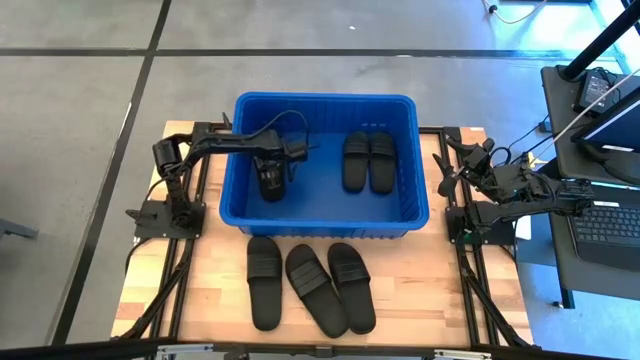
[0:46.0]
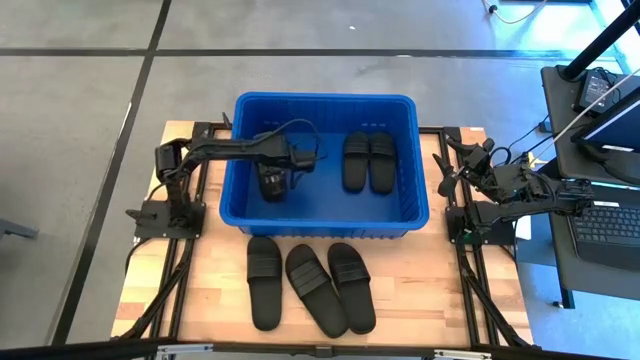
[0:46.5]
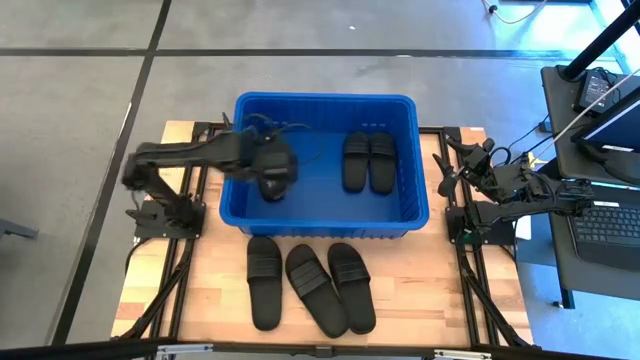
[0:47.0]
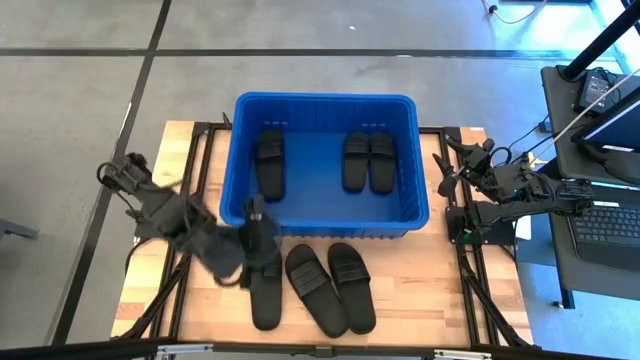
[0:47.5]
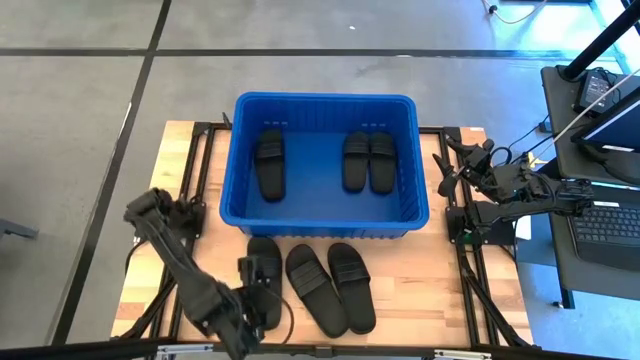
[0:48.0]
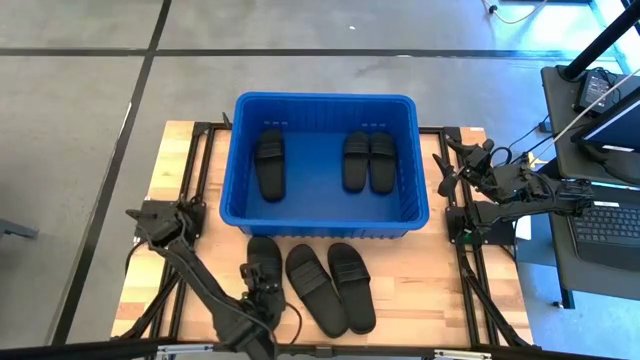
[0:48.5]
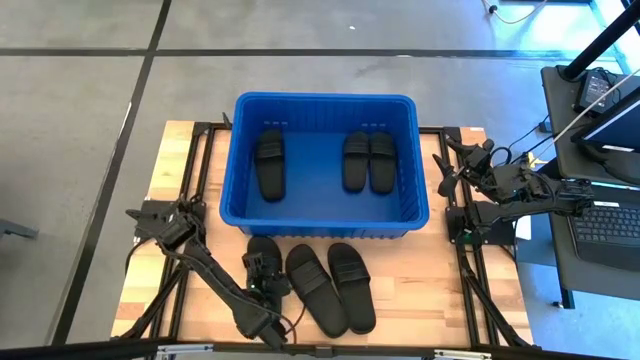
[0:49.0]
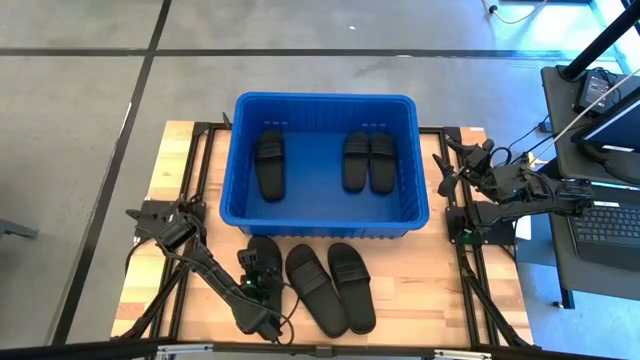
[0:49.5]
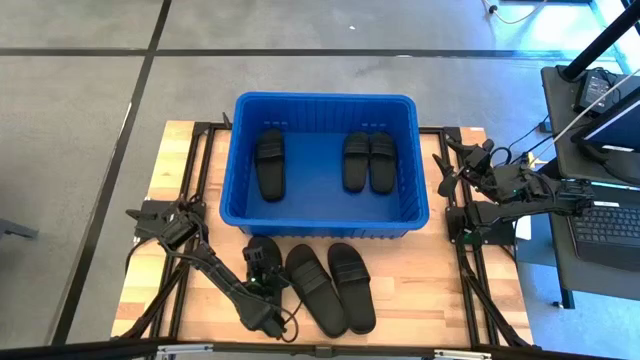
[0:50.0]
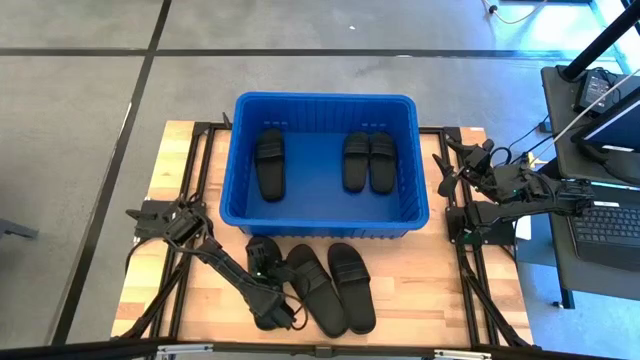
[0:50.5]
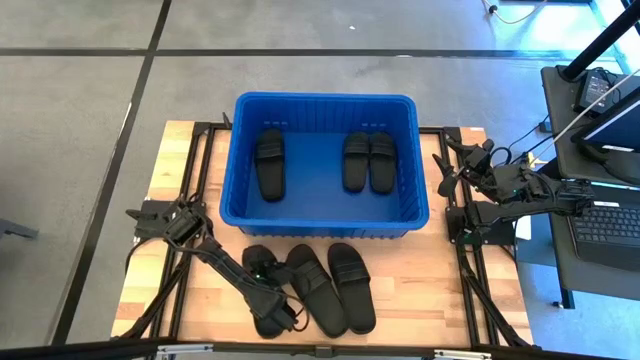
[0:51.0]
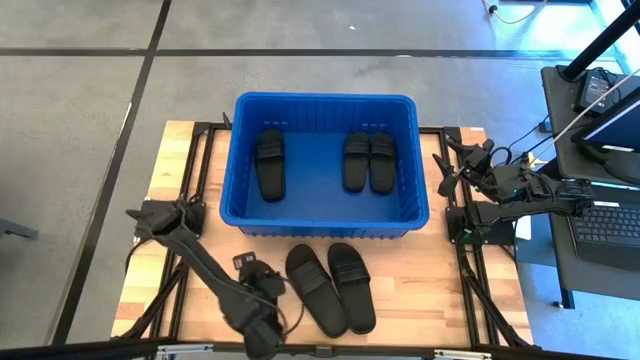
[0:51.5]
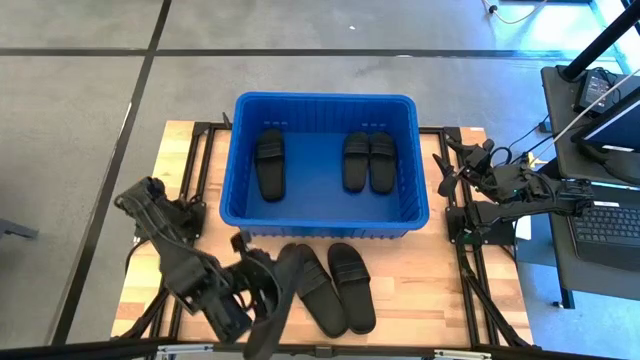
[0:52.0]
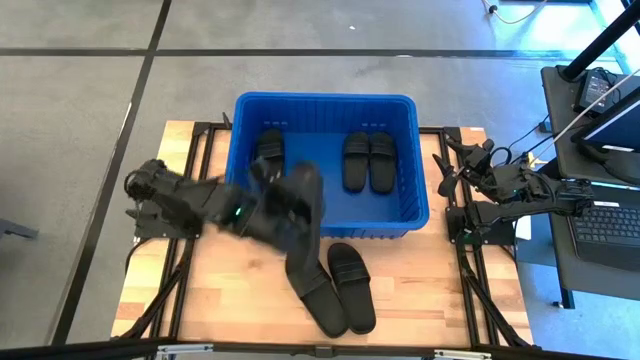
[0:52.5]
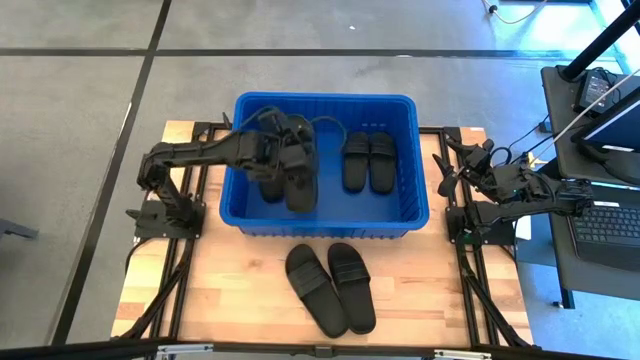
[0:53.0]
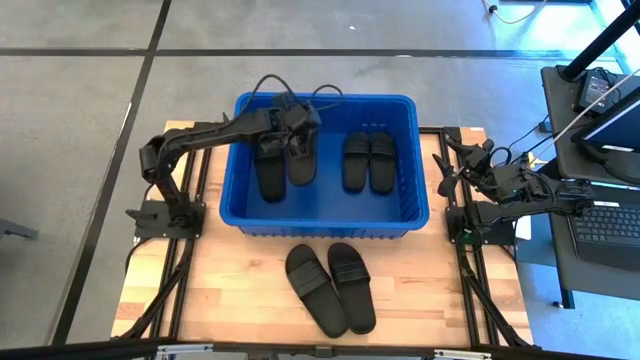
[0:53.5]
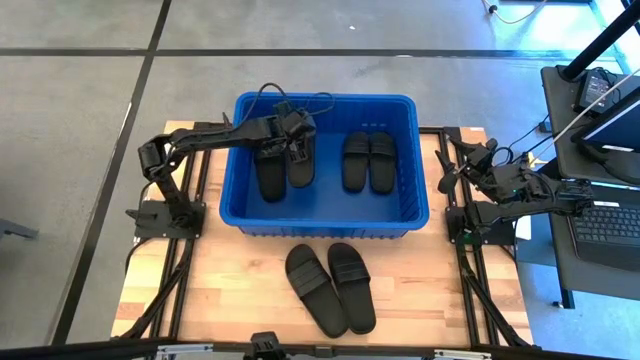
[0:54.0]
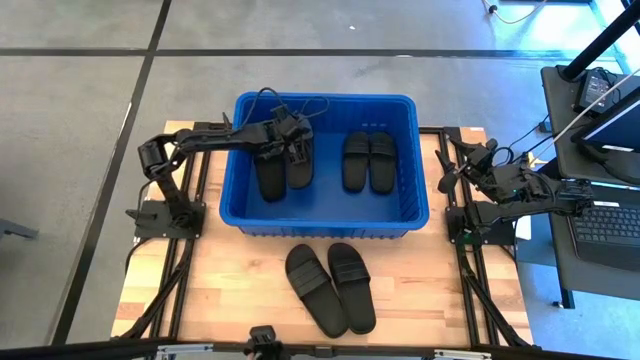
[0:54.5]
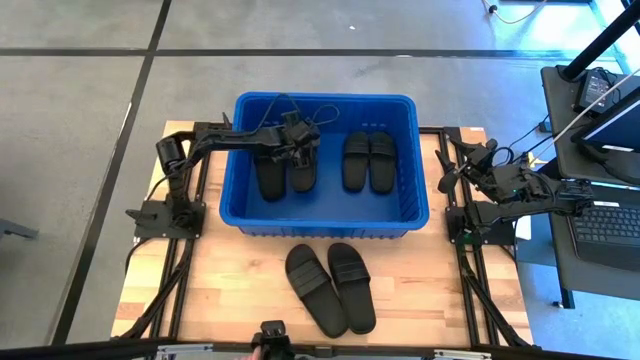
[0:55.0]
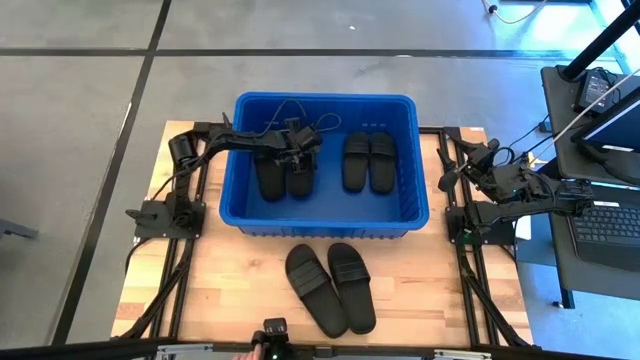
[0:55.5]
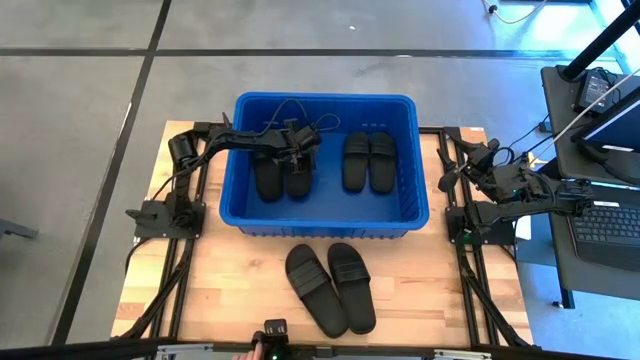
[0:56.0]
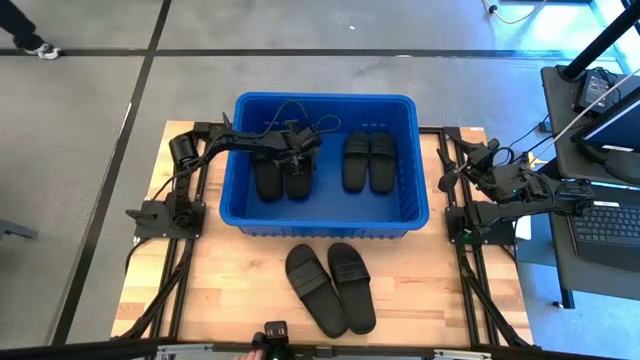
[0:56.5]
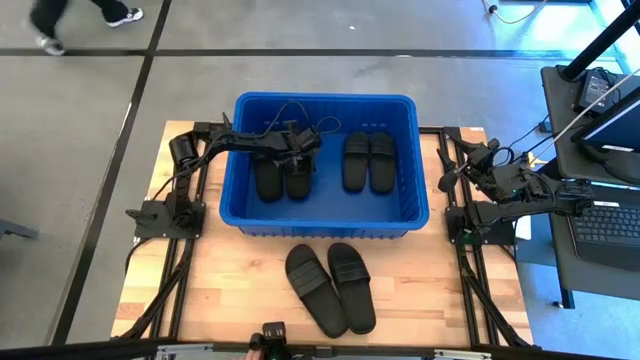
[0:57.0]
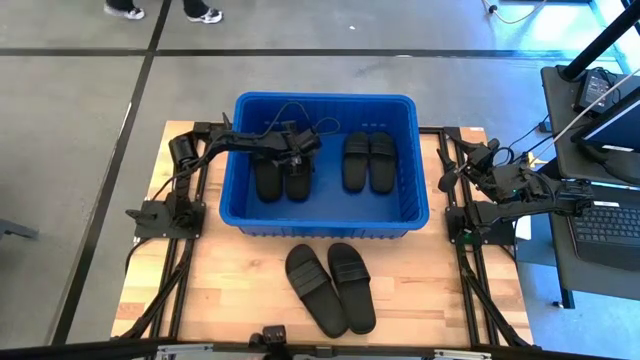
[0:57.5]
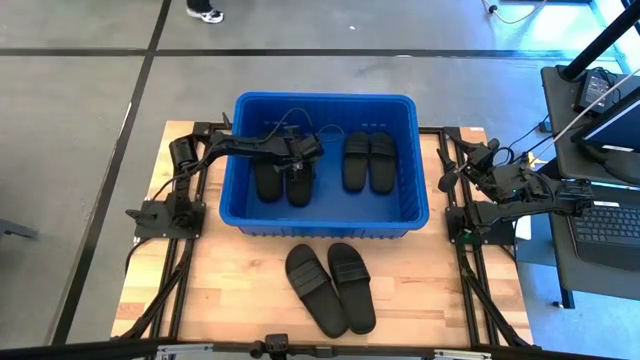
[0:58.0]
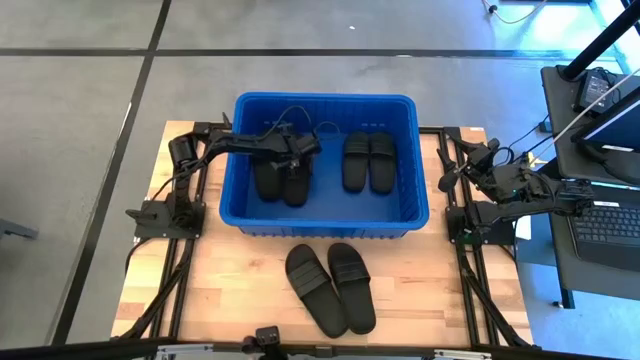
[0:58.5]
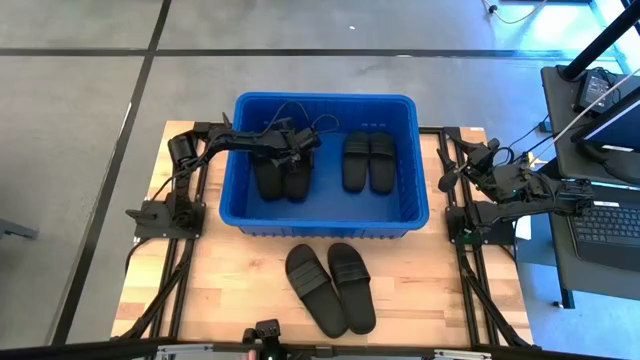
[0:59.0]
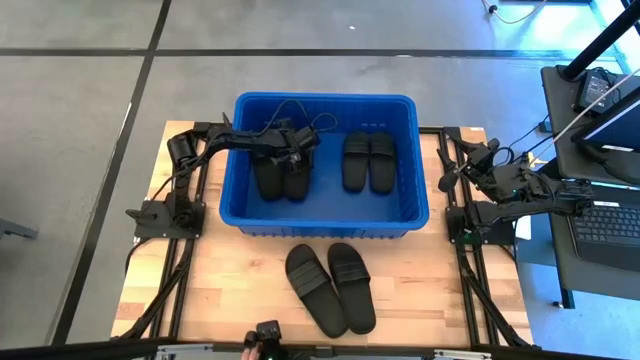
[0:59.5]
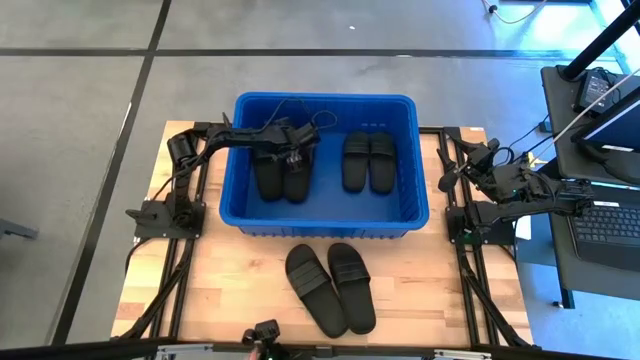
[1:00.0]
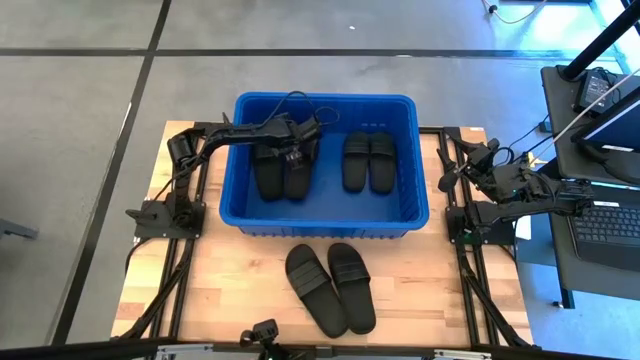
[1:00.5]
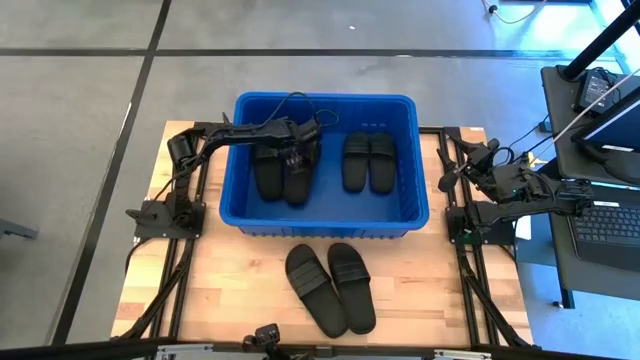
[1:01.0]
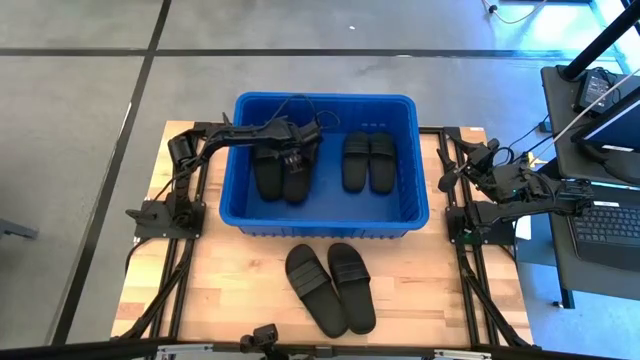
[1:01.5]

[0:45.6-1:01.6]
Task: Pick and place slides into bin
Put the black slide into the blue organizer bin

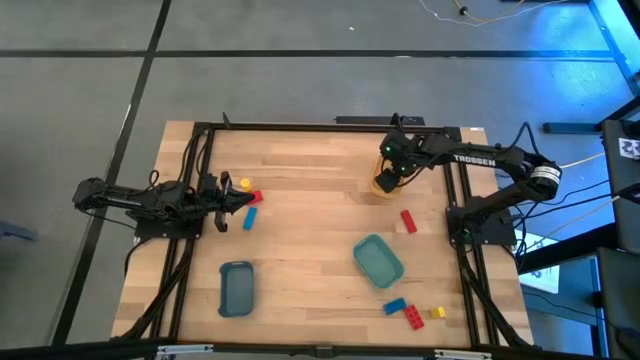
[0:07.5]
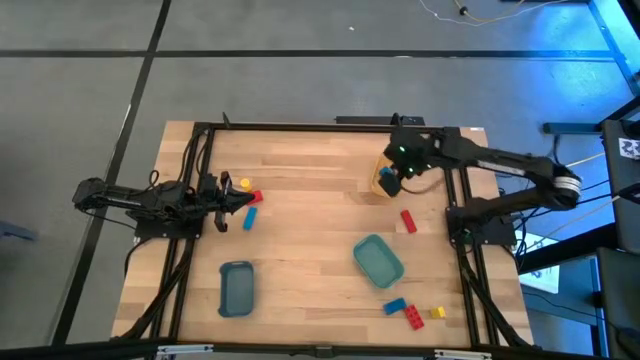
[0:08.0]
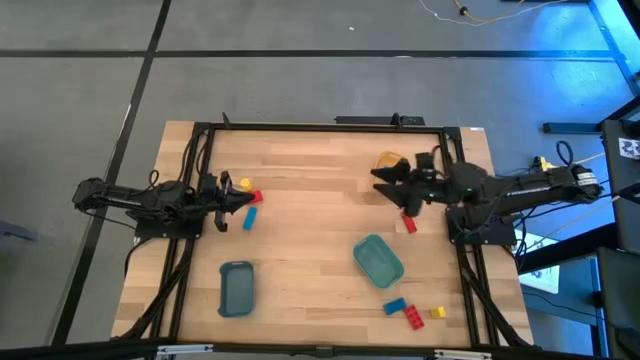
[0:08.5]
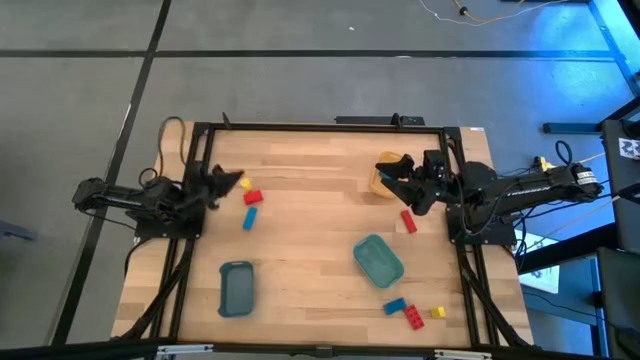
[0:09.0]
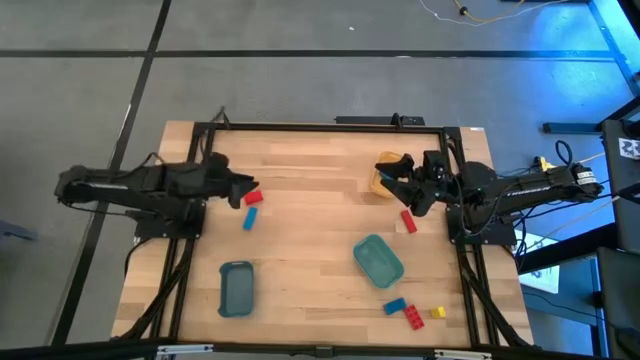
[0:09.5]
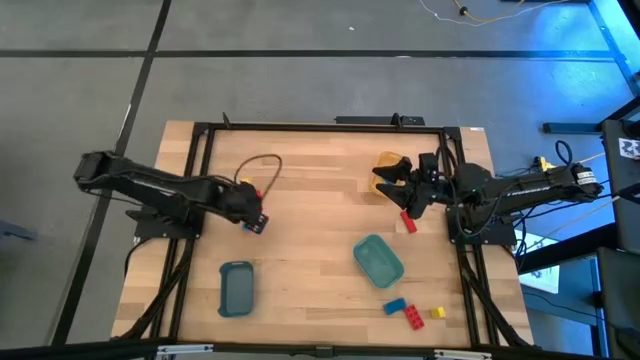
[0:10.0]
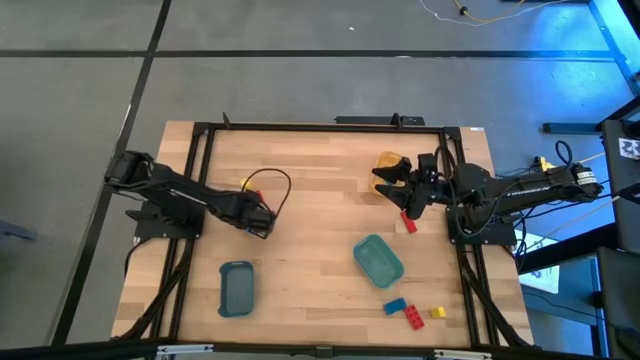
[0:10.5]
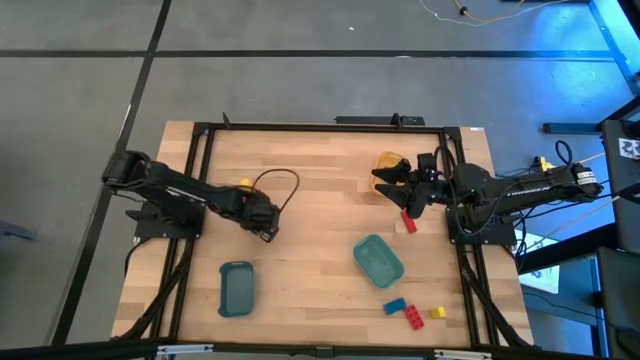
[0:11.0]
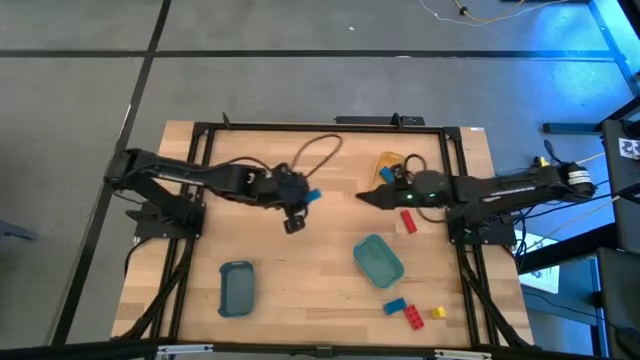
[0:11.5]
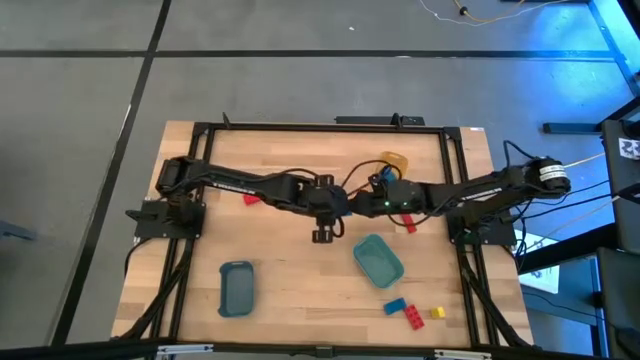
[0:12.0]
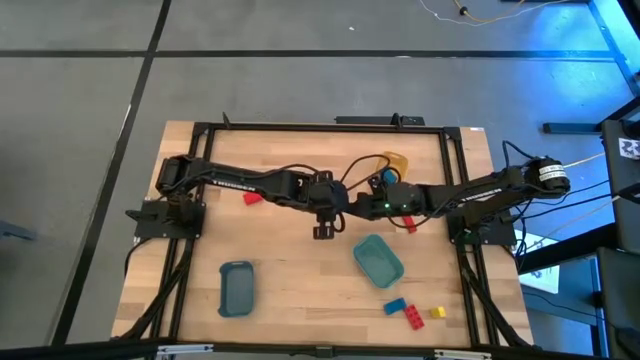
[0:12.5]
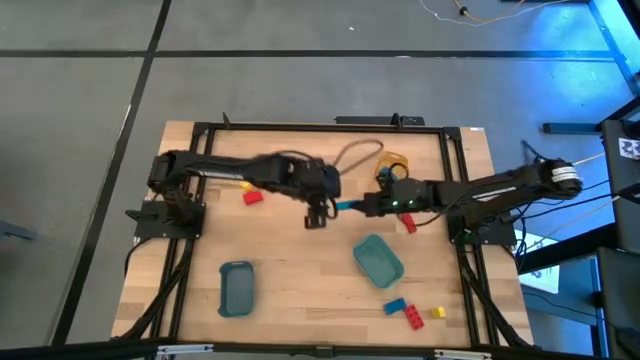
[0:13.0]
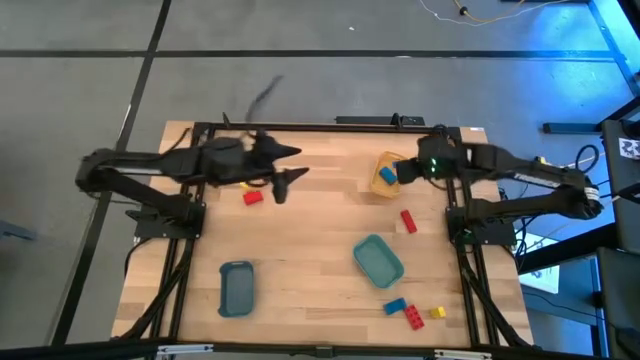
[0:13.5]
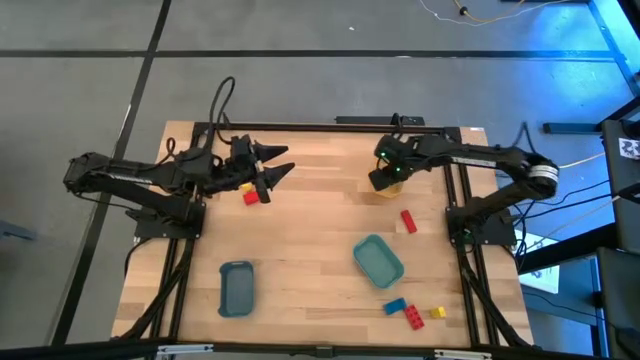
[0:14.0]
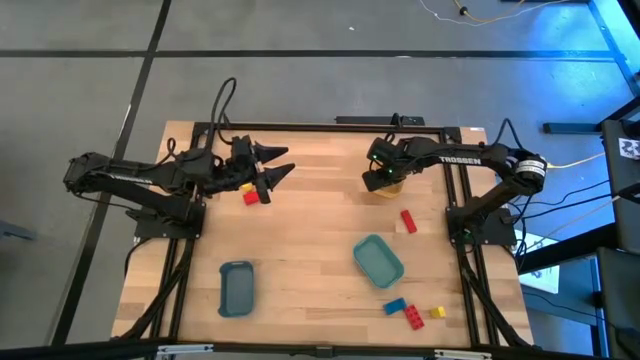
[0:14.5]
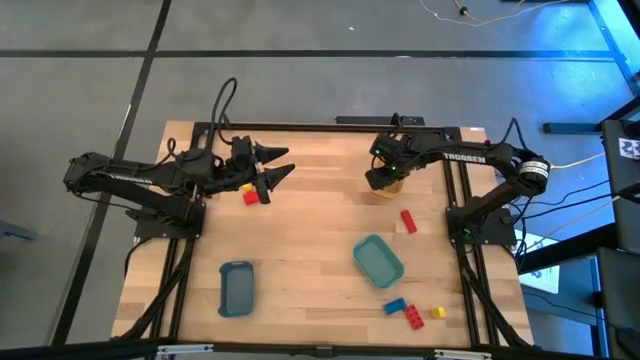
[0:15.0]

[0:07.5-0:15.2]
Task: Sort & place blocks by color
Put the top blue block into the yellow bin
